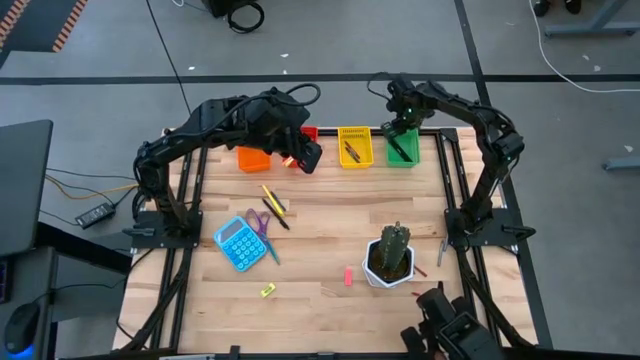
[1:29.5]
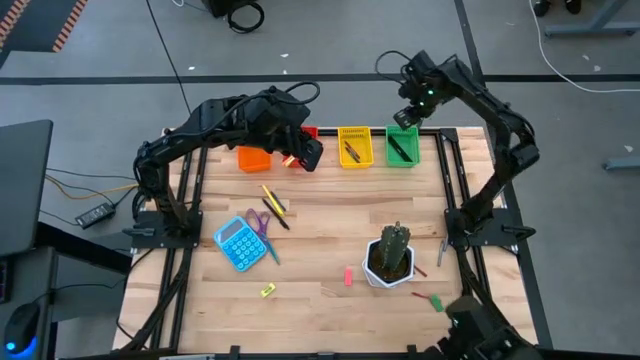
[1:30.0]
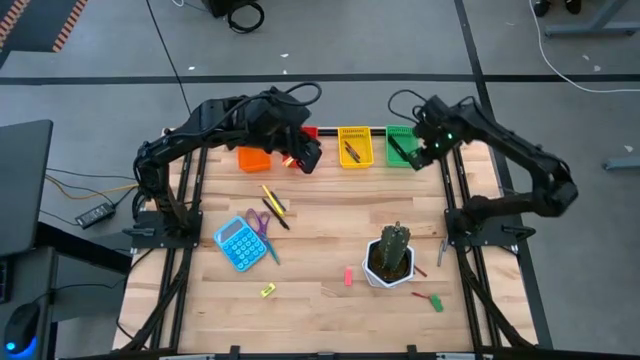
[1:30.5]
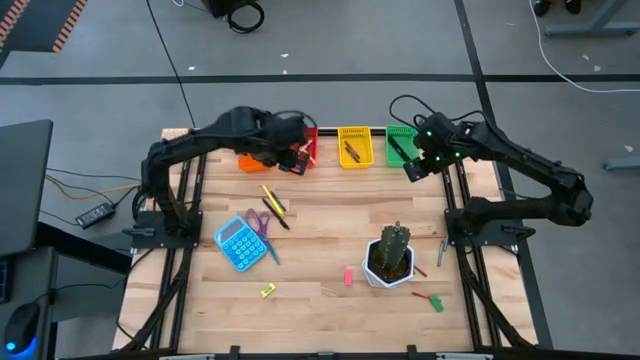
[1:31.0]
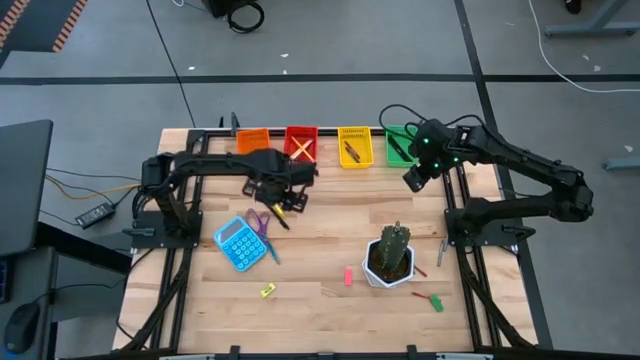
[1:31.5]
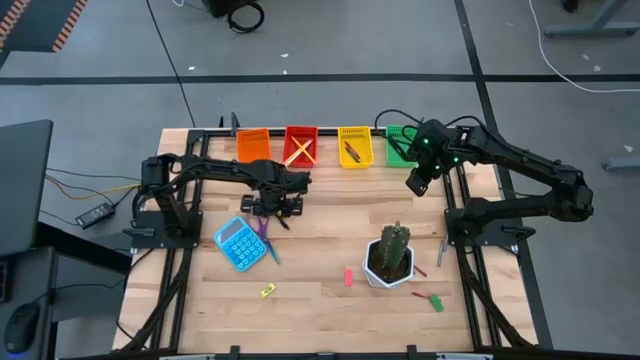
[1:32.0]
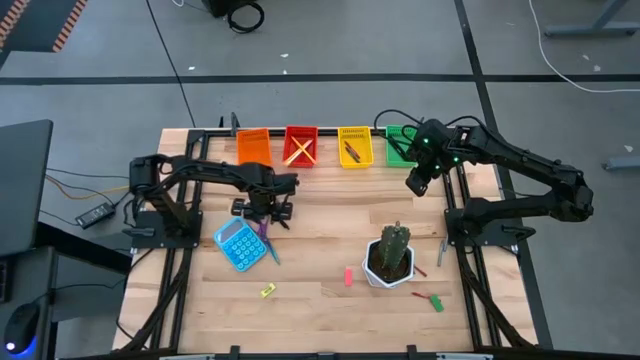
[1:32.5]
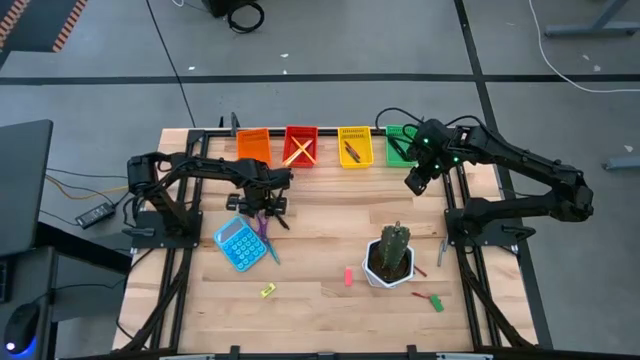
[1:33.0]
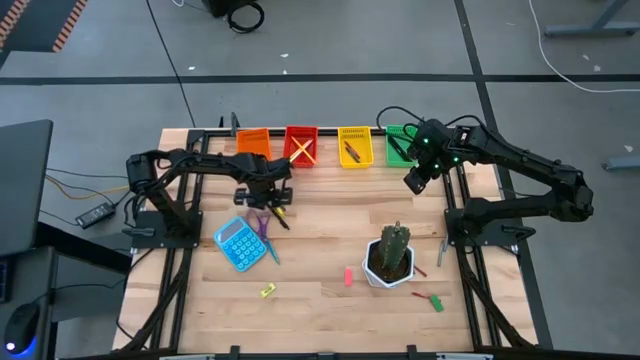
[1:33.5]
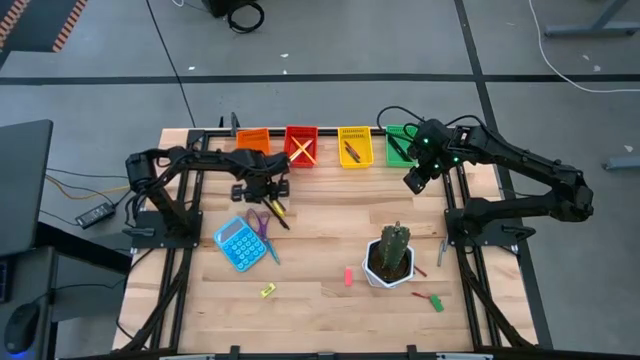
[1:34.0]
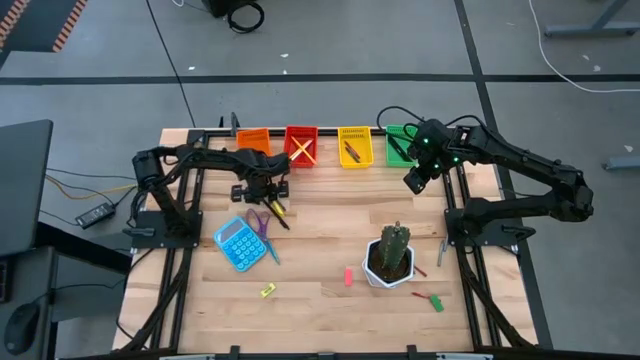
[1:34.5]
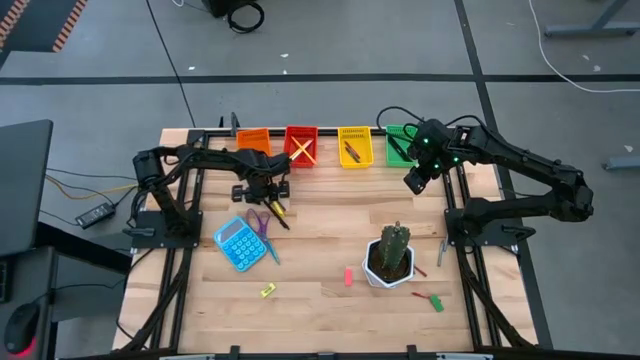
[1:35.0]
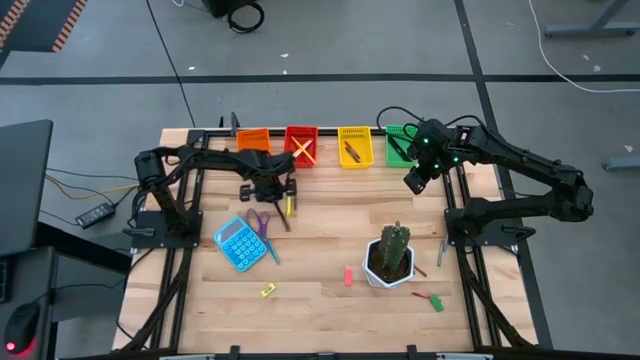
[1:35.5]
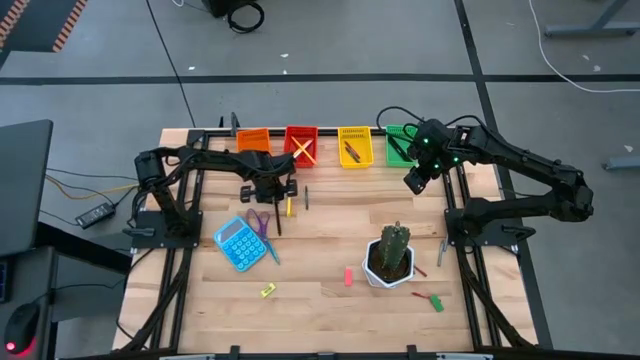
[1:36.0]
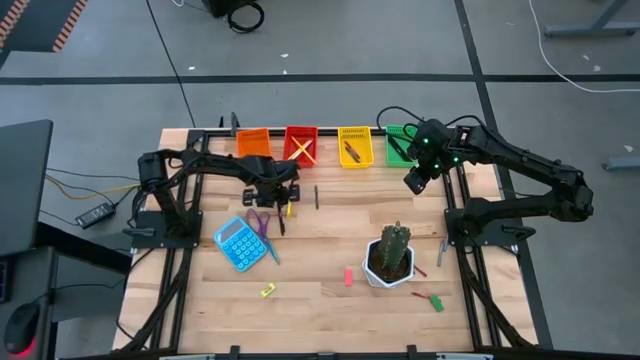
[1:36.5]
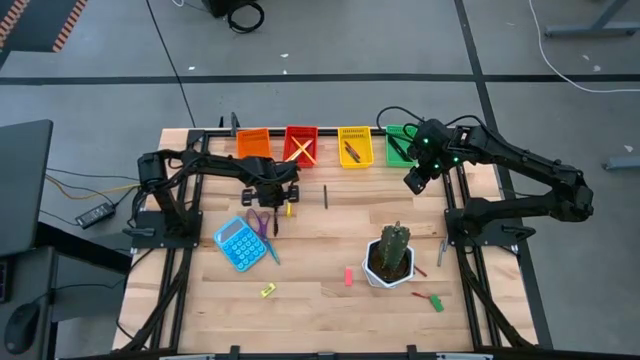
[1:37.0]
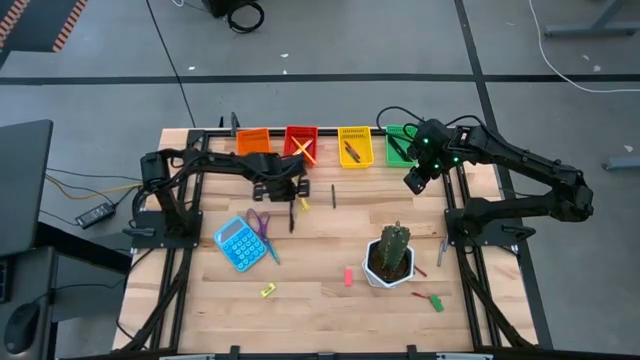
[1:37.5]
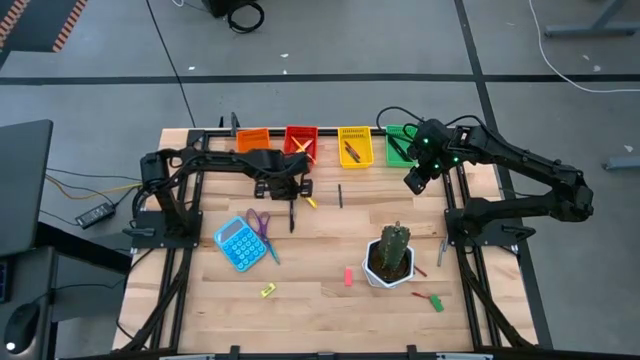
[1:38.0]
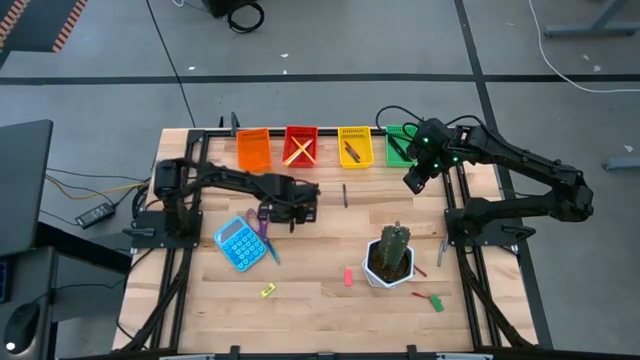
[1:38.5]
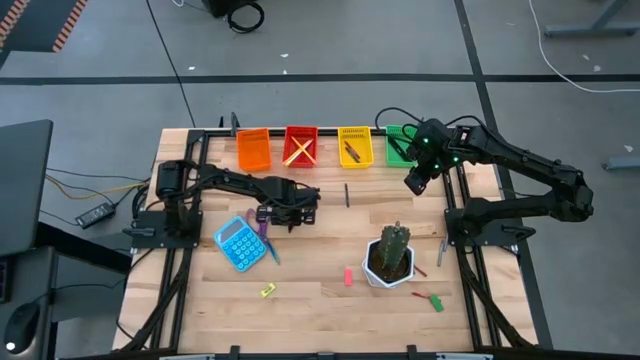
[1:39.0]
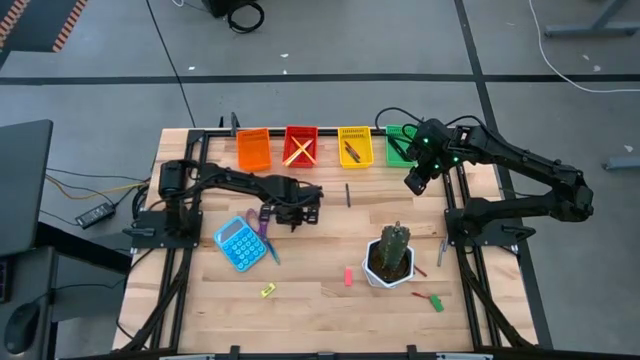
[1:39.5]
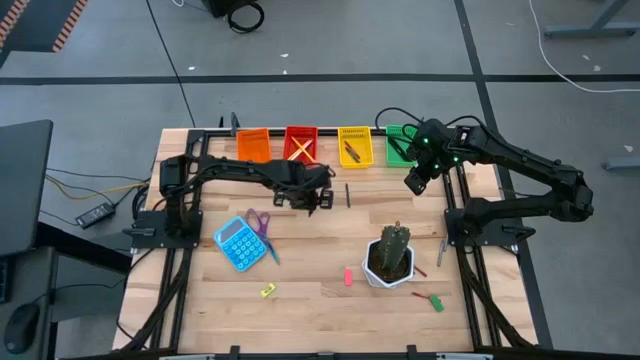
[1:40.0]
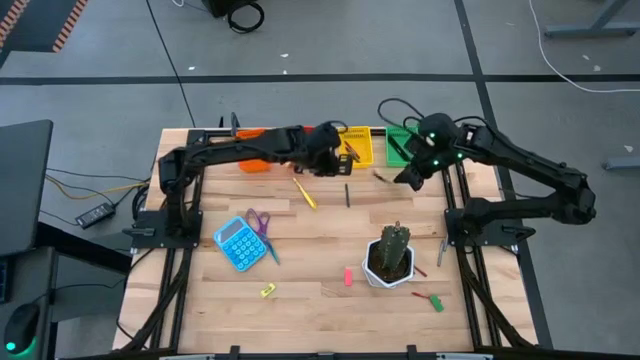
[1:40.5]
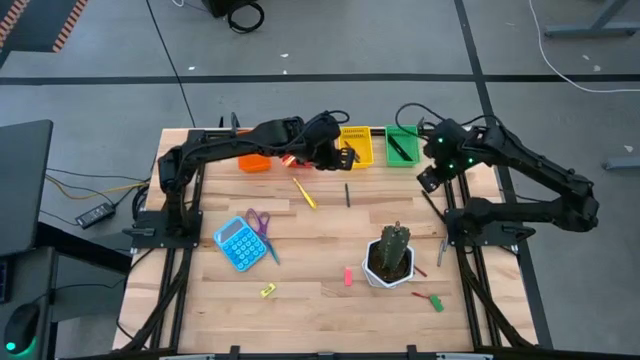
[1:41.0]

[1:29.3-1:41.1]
Task: Sort crayons/erasers/pens/pencils in bins
Put the black pen into the green bin

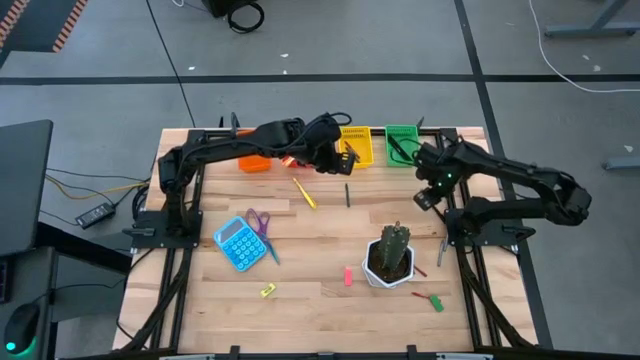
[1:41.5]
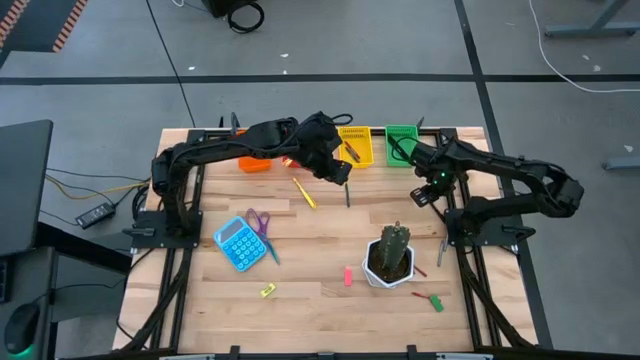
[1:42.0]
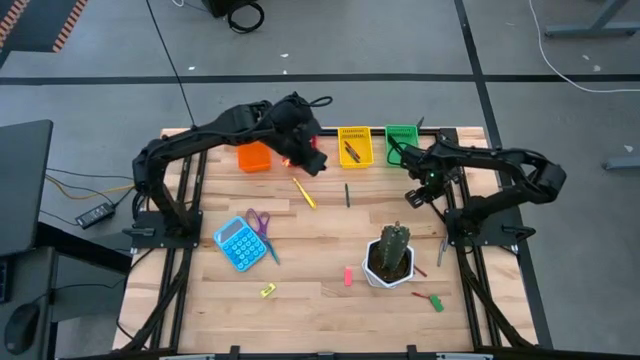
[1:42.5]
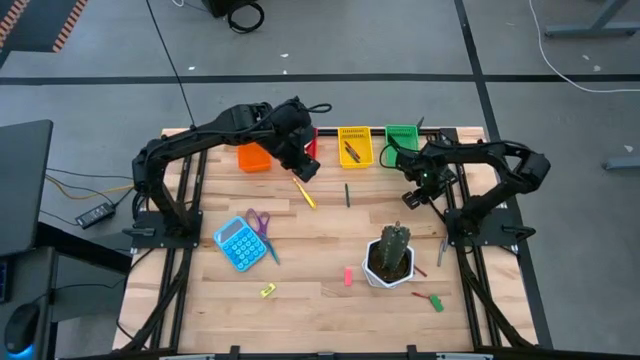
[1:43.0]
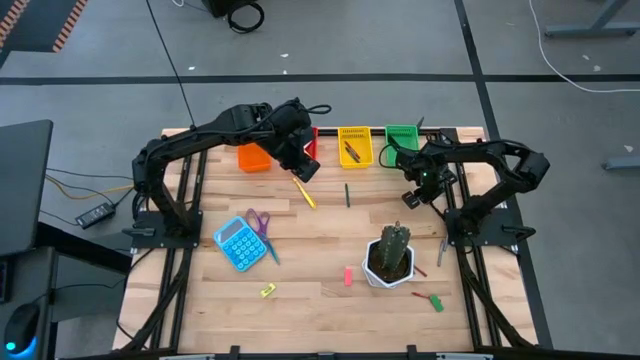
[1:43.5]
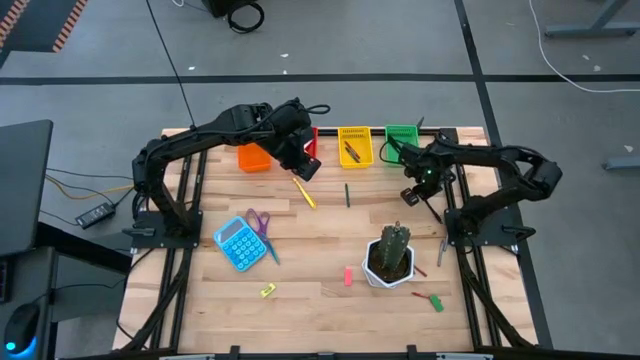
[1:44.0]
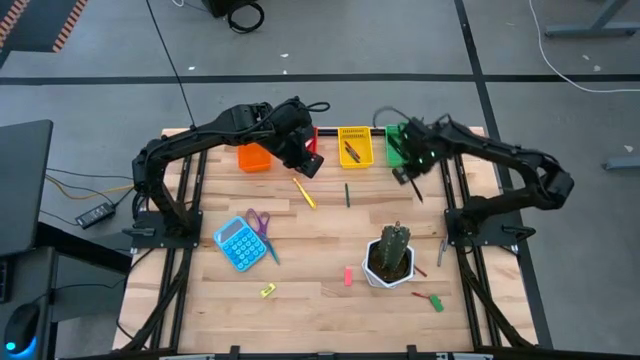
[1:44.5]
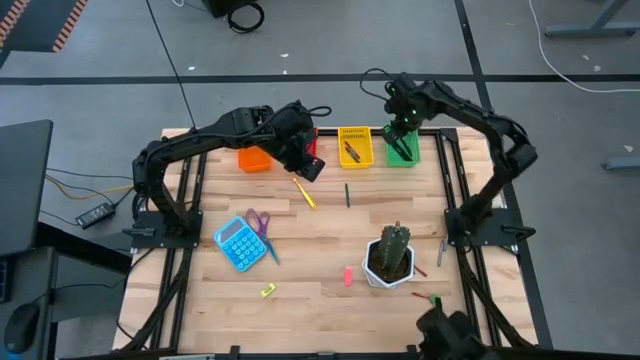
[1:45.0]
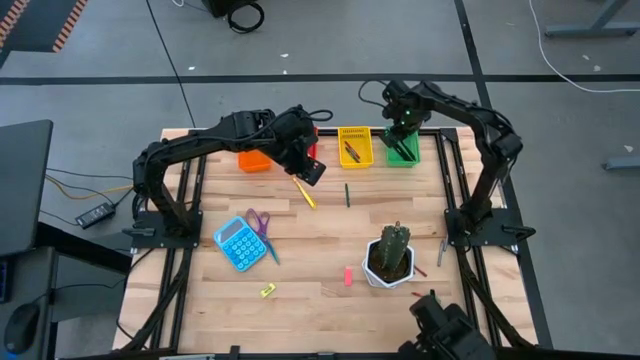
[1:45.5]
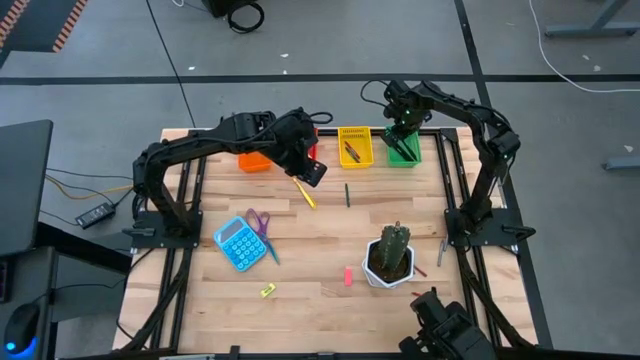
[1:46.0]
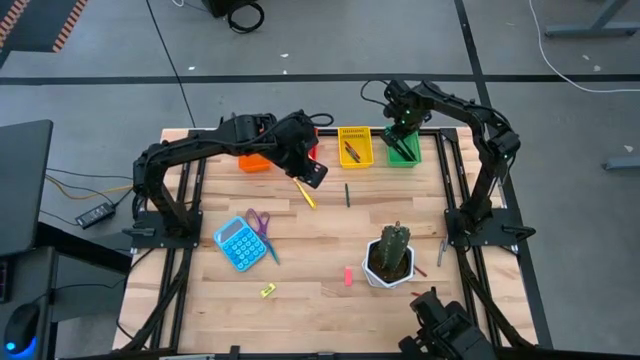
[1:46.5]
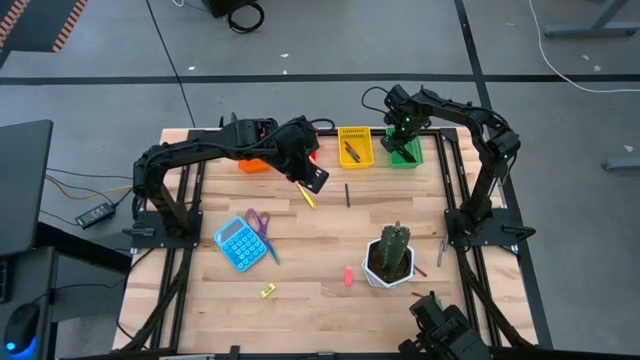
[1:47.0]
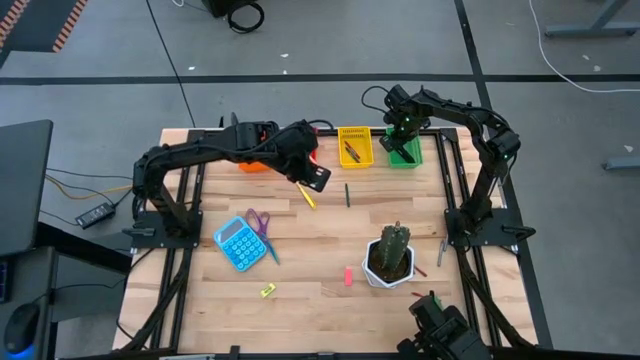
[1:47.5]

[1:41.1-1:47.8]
Put the black pen into the green bin

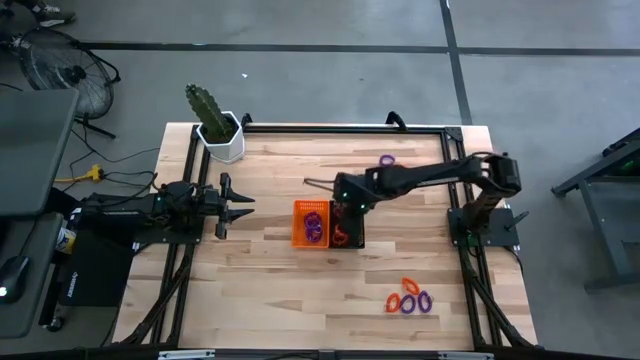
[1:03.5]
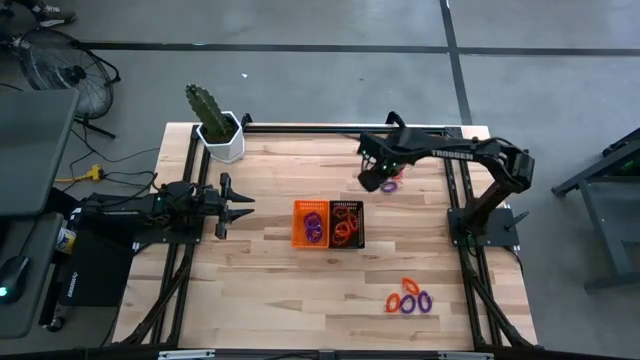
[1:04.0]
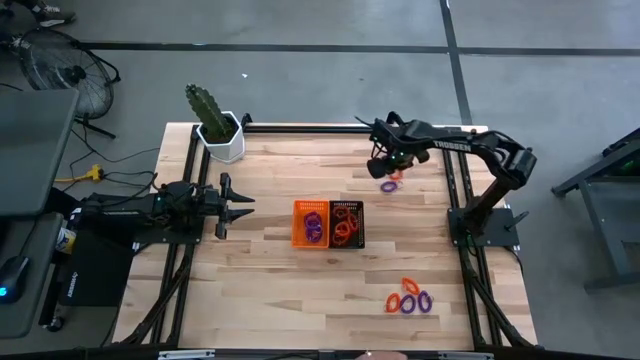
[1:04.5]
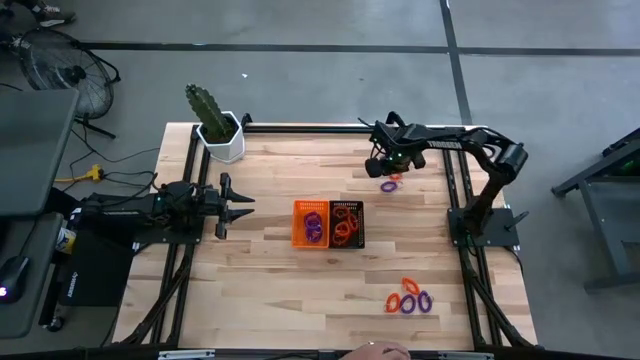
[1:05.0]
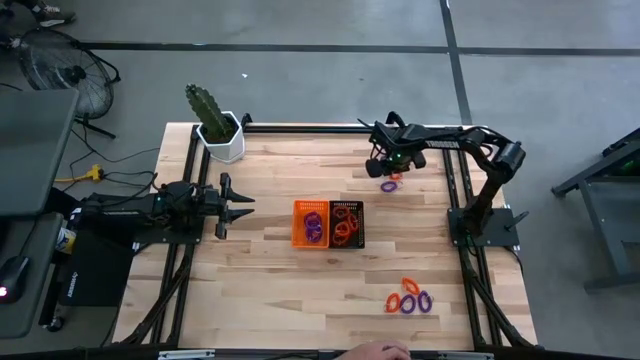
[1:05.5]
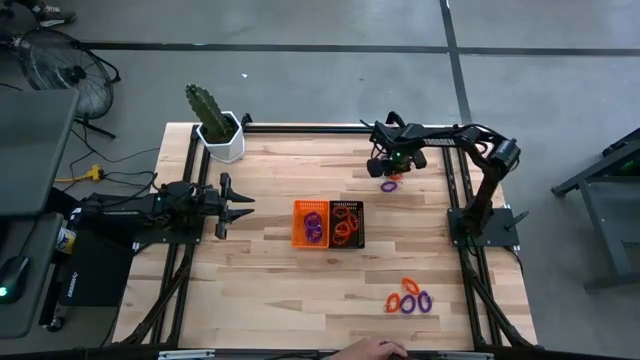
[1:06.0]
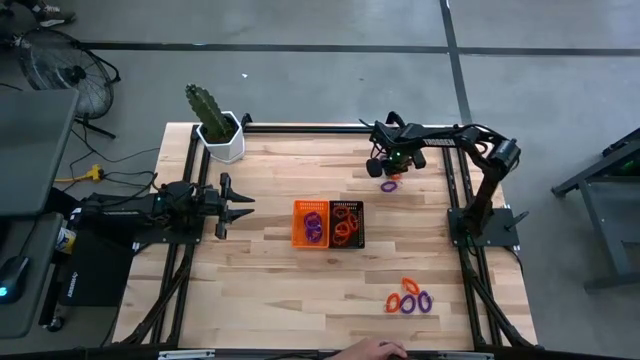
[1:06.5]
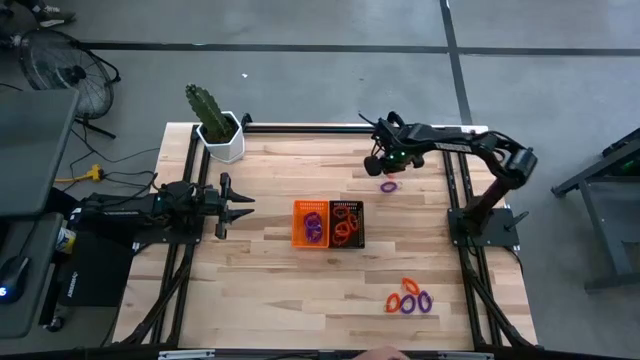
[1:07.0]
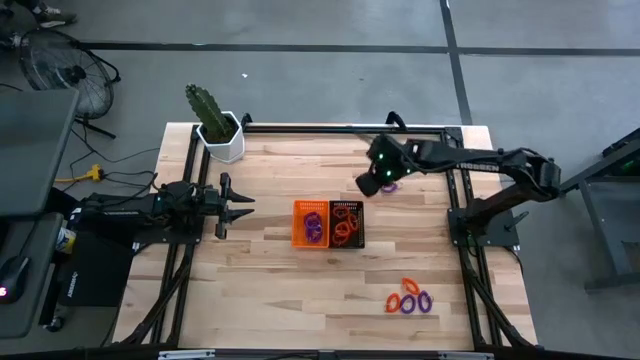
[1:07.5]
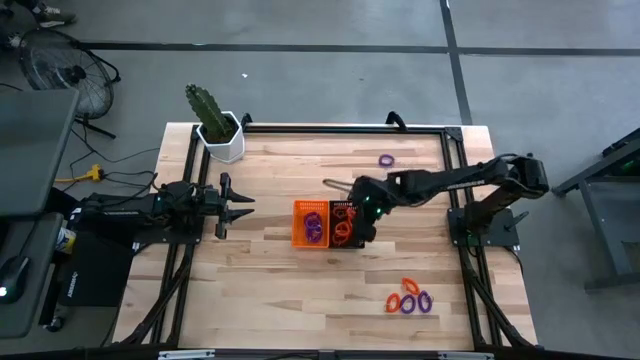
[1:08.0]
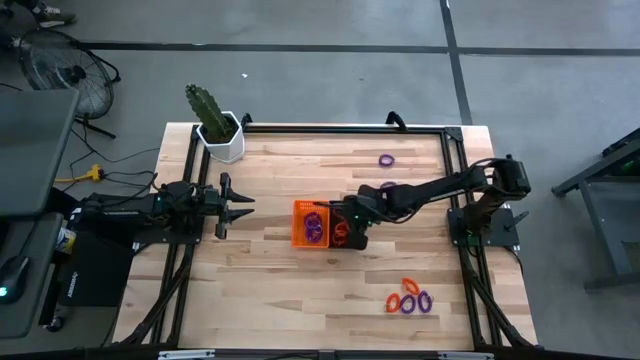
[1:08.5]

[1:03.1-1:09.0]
Task: Sort spring keychains
Put the orange spring keychain into the black bin
